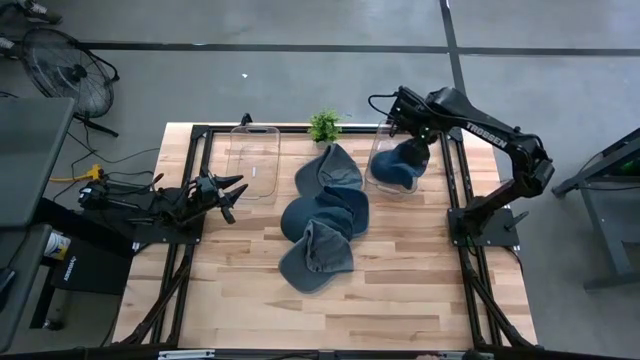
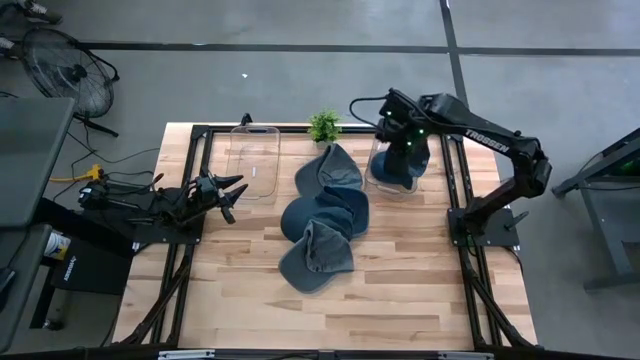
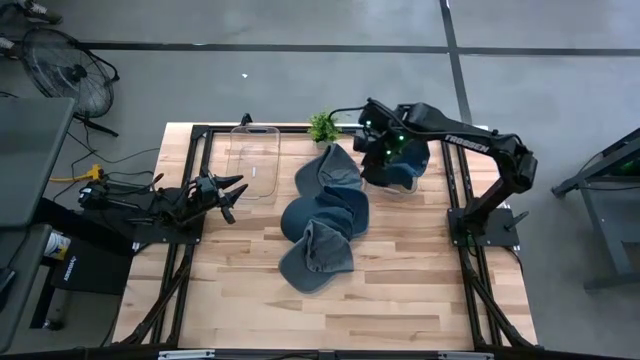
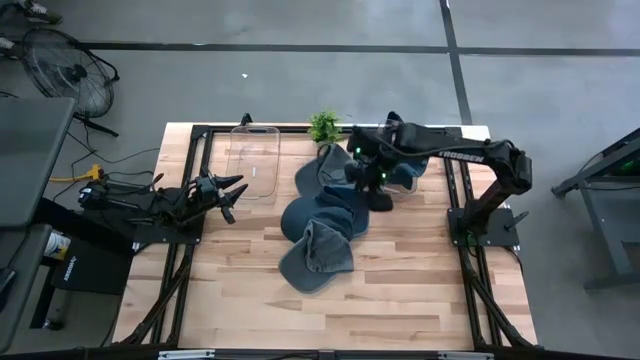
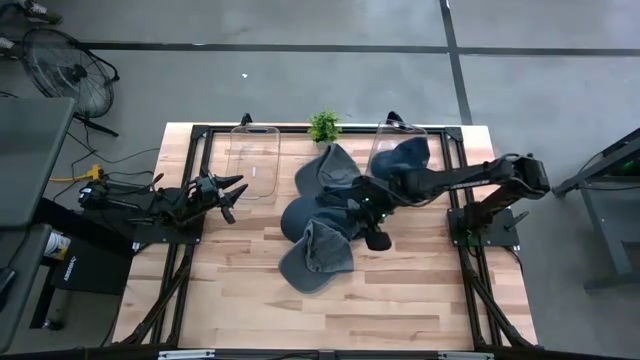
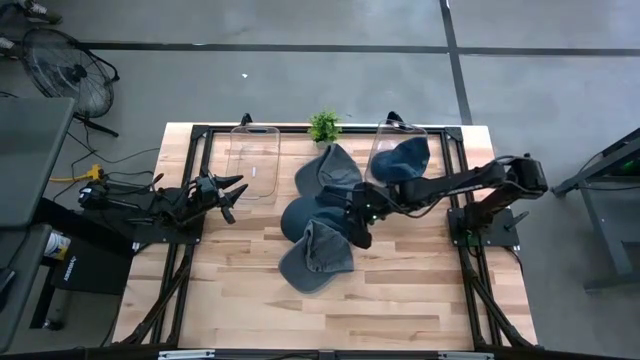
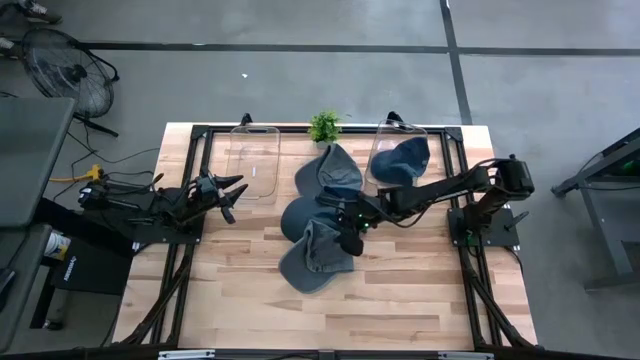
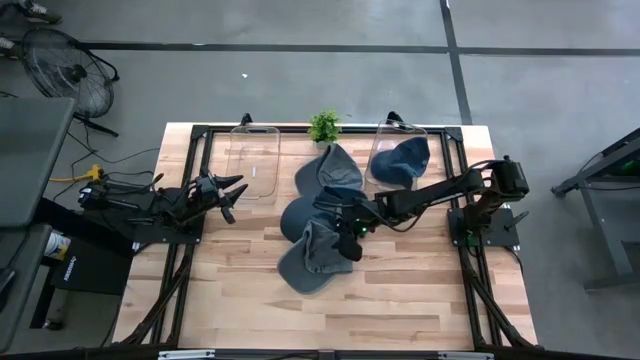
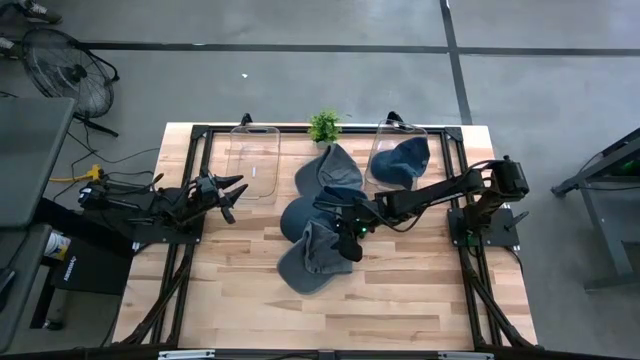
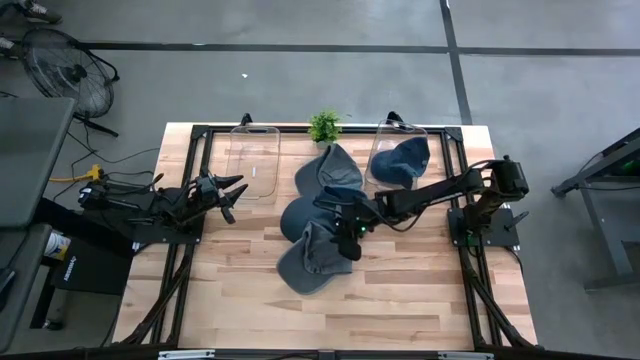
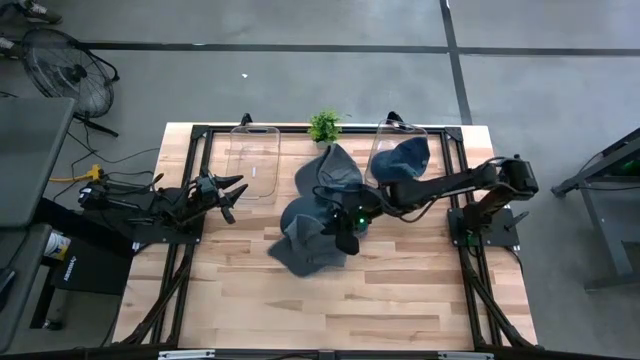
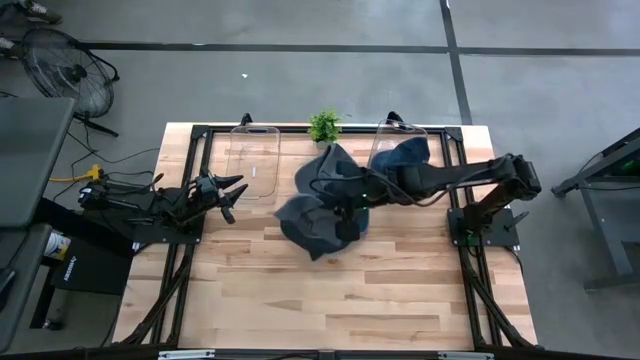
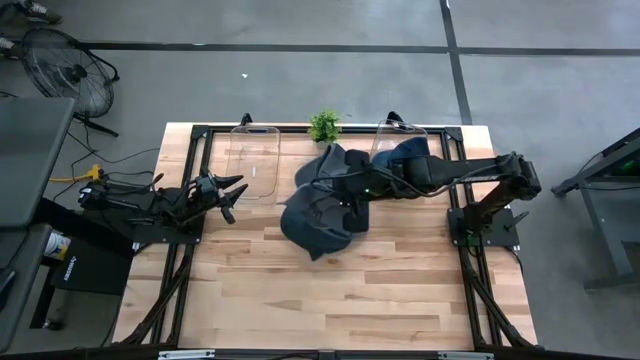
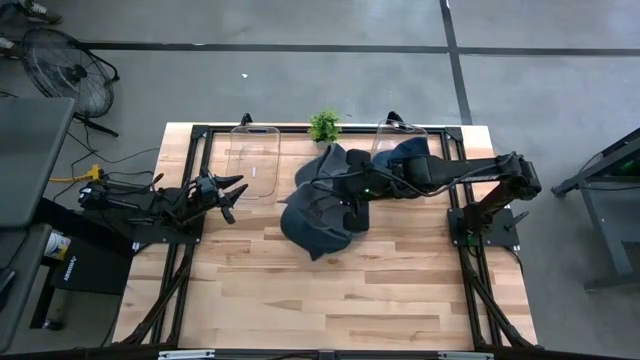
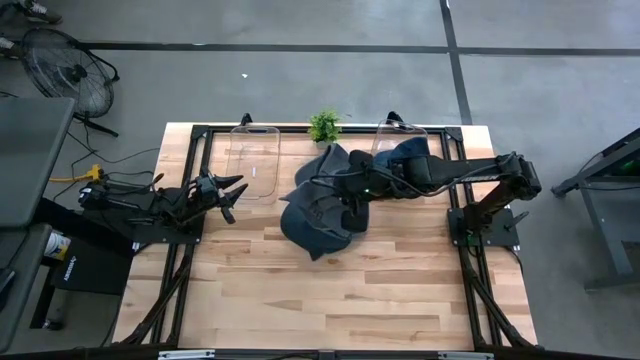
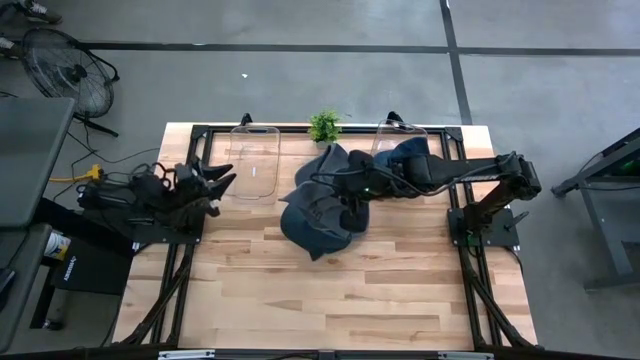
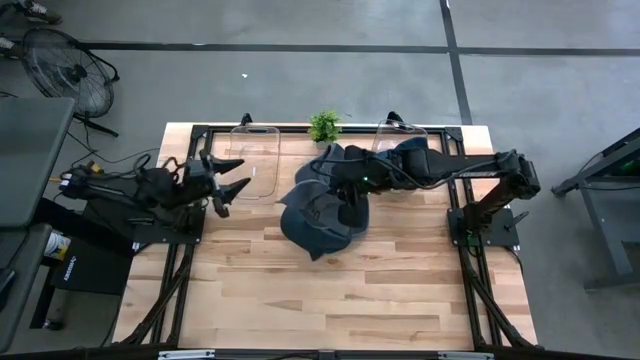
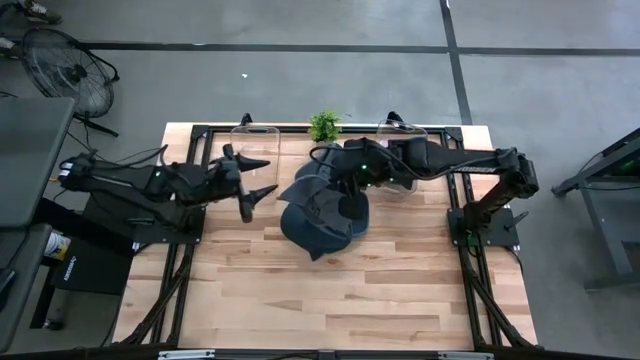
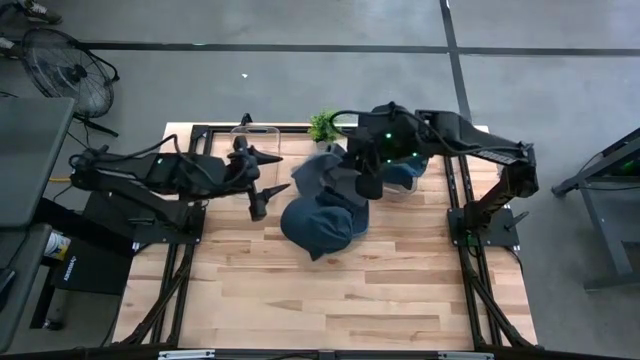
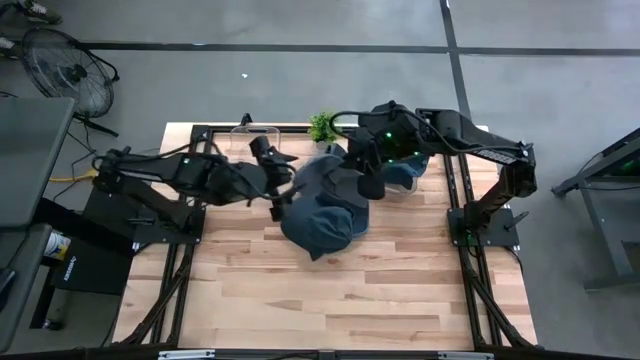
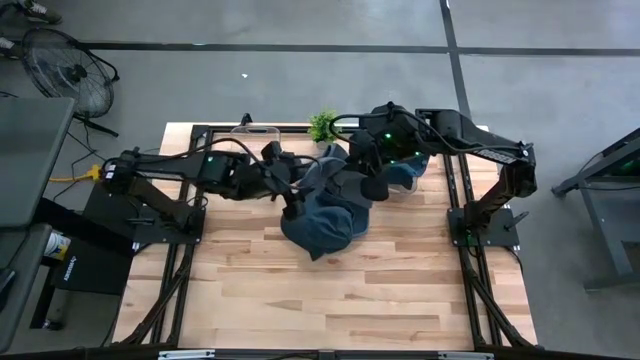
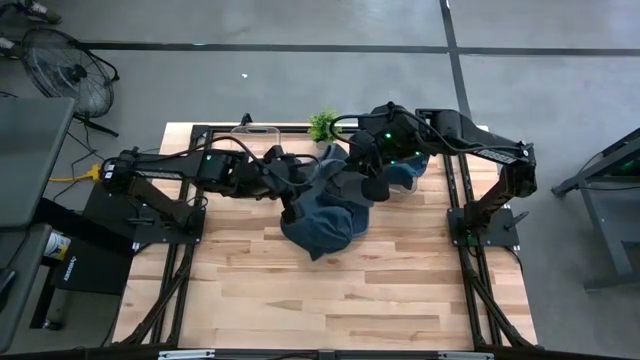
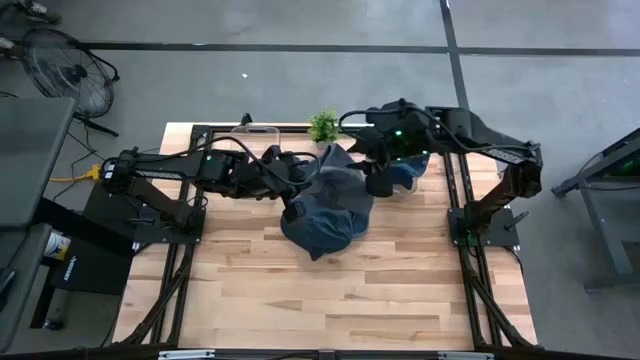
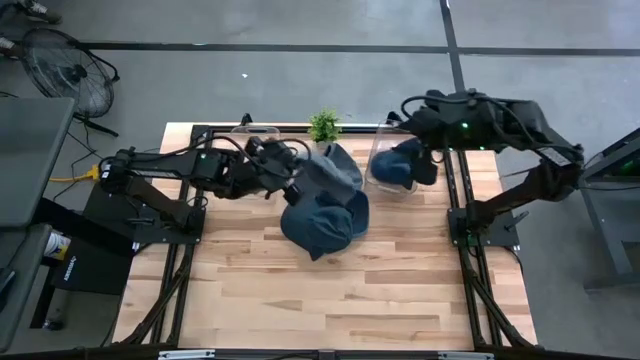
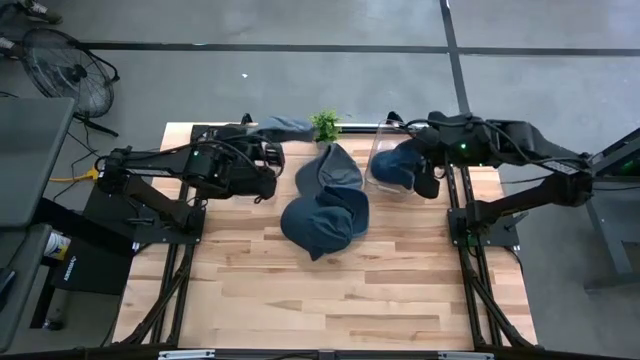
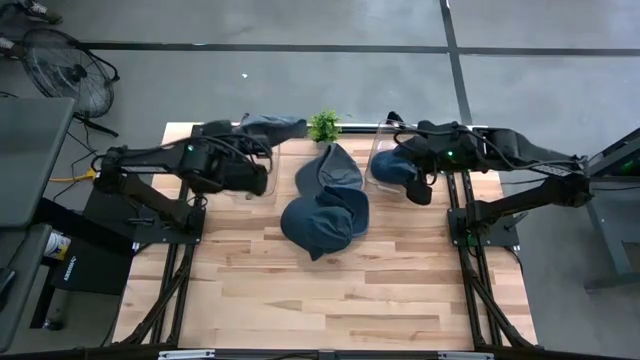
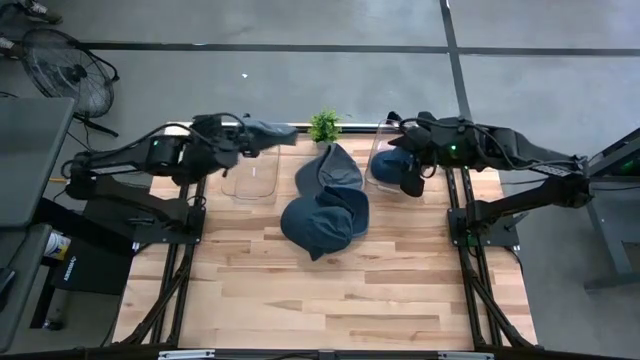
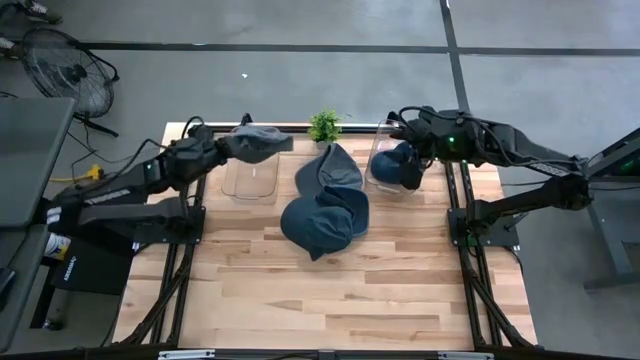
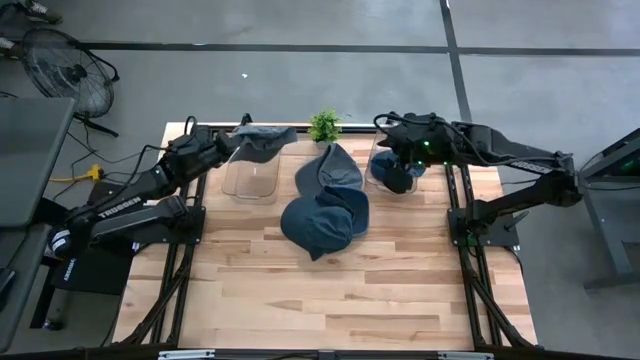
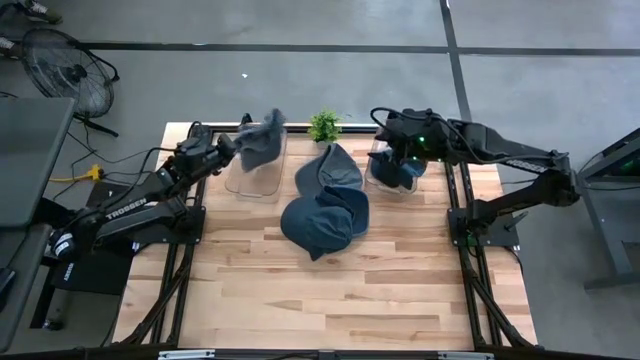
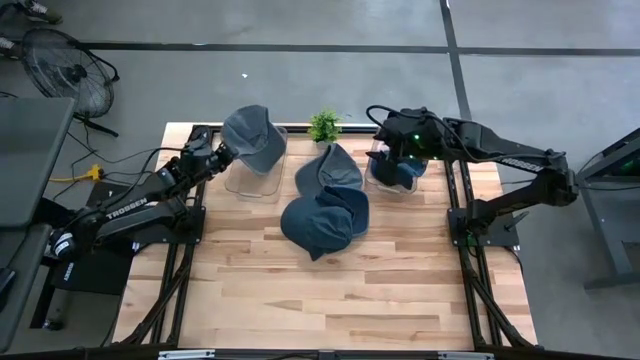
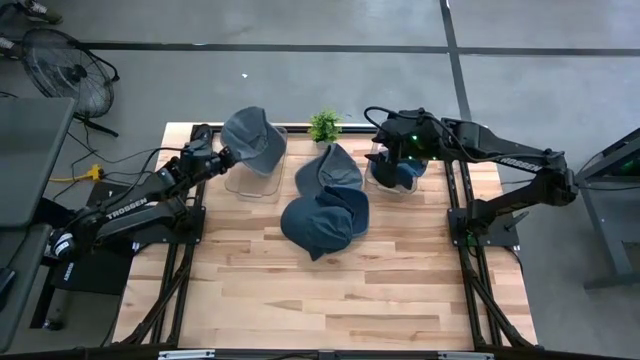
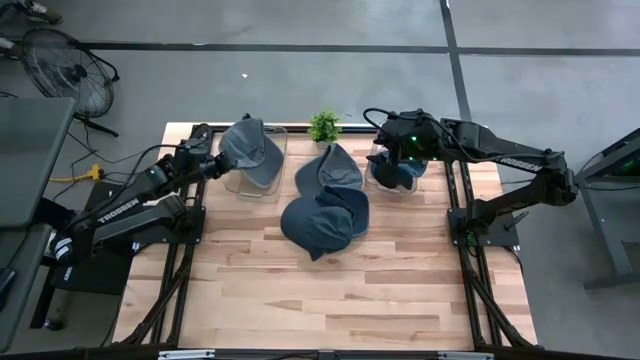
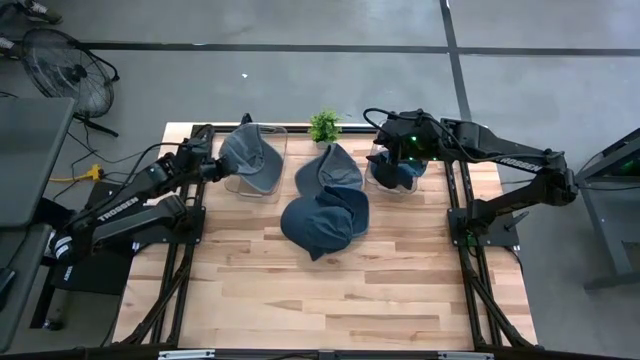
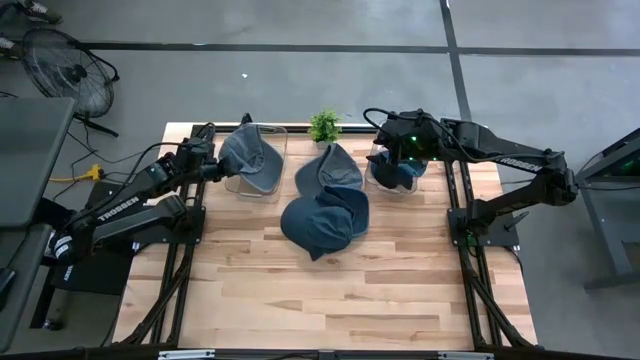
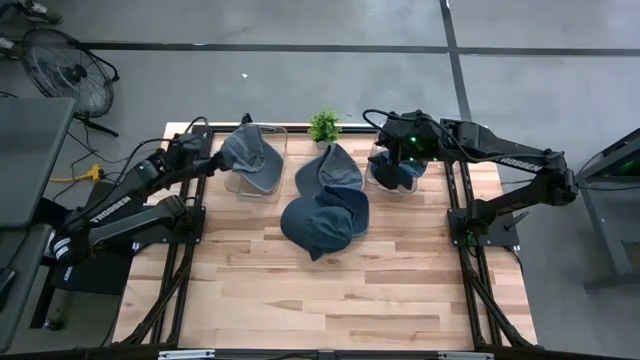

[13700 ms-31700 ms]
Task: Pick & Place hat
Put the bottom gray cap into the left transparent bin
